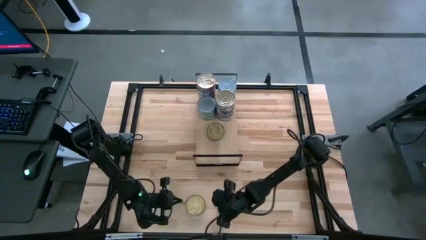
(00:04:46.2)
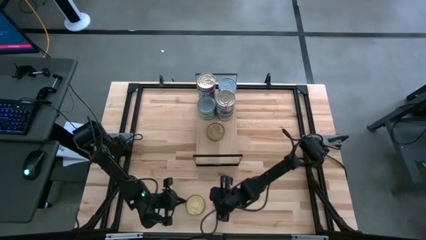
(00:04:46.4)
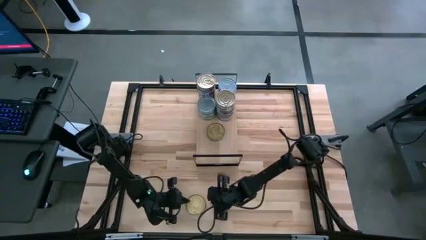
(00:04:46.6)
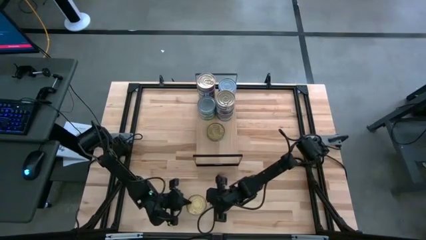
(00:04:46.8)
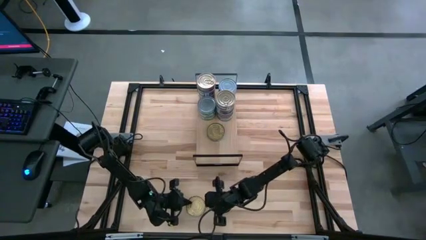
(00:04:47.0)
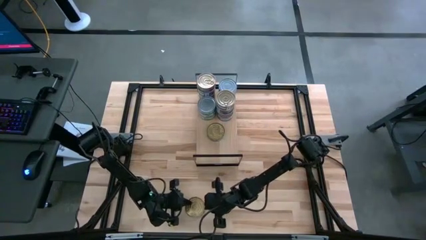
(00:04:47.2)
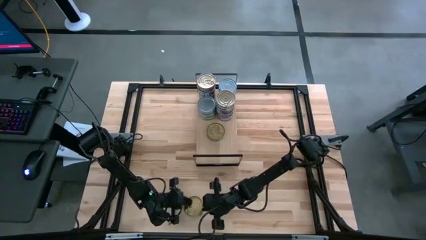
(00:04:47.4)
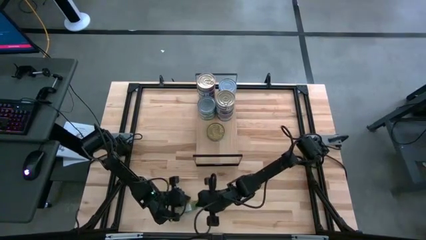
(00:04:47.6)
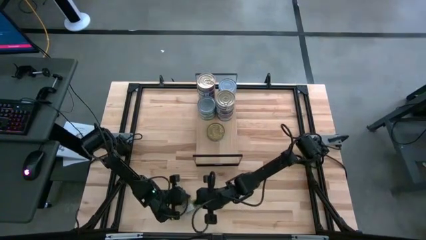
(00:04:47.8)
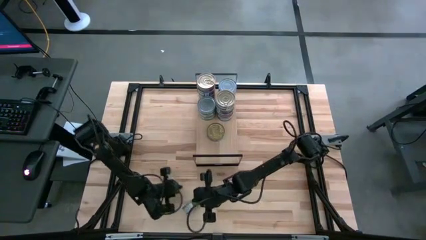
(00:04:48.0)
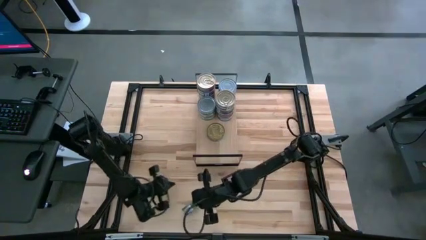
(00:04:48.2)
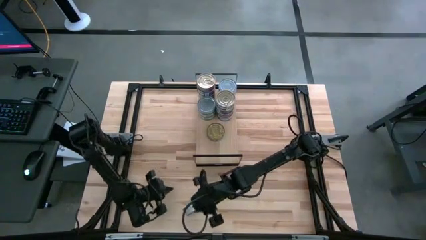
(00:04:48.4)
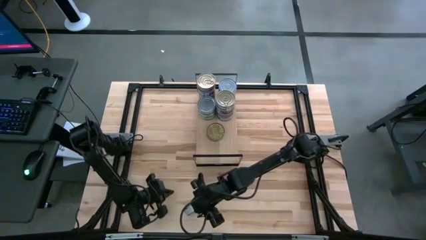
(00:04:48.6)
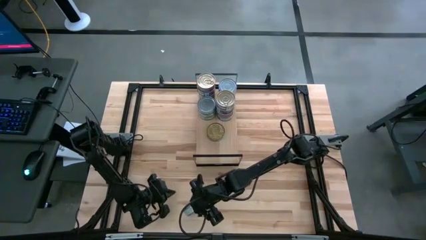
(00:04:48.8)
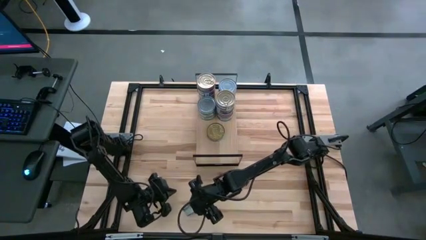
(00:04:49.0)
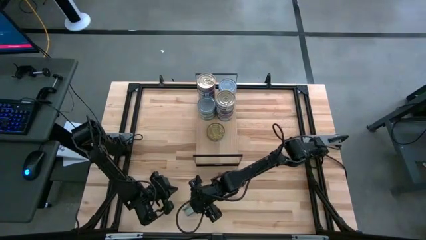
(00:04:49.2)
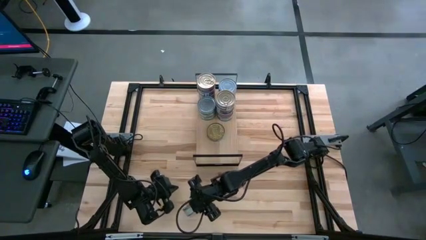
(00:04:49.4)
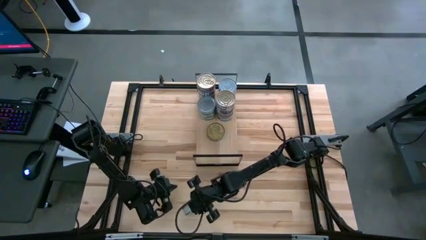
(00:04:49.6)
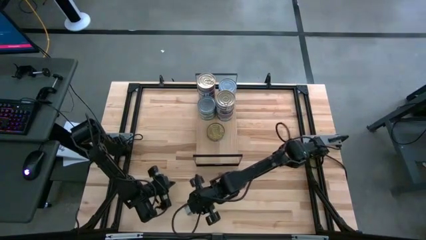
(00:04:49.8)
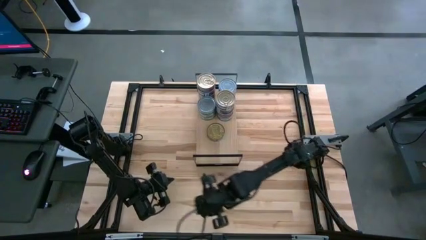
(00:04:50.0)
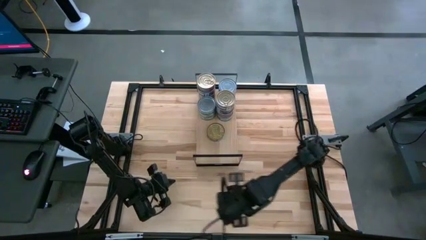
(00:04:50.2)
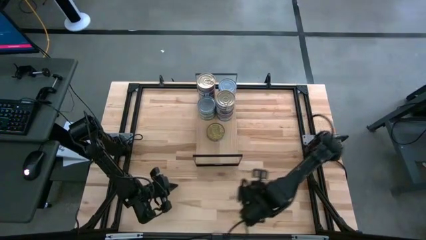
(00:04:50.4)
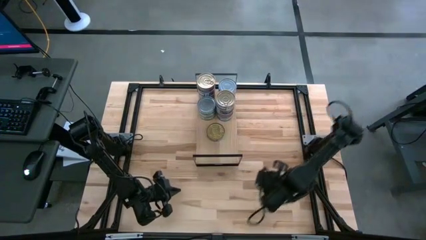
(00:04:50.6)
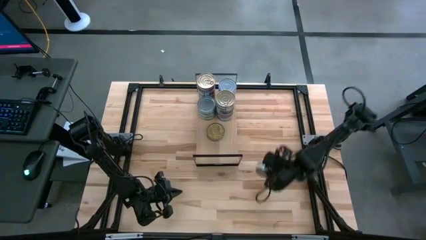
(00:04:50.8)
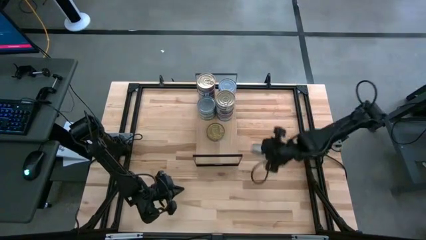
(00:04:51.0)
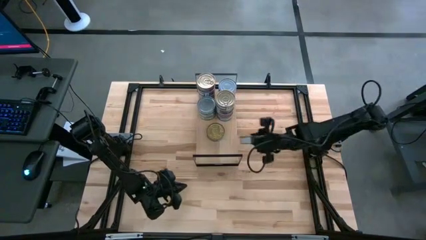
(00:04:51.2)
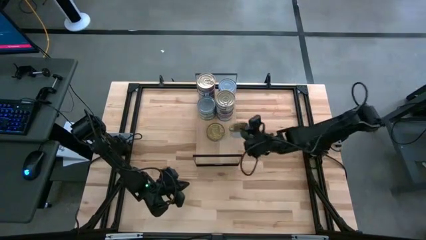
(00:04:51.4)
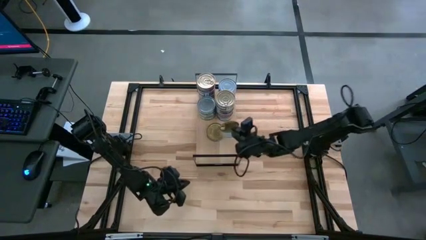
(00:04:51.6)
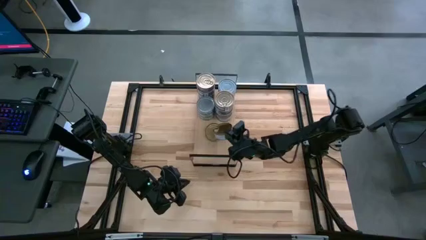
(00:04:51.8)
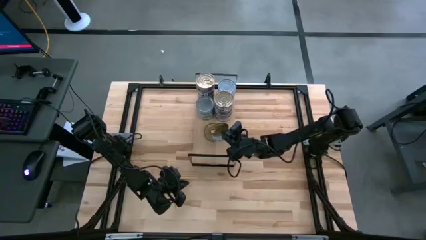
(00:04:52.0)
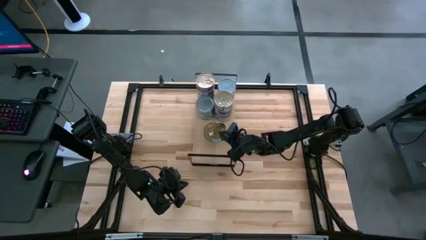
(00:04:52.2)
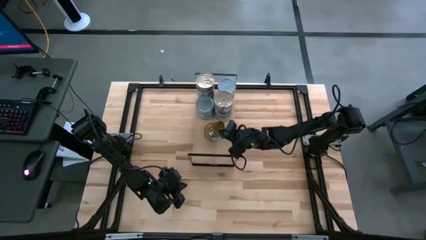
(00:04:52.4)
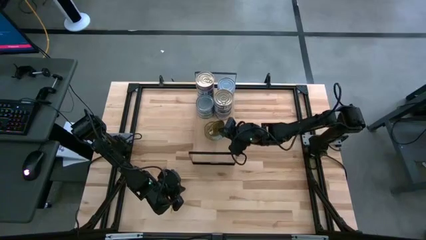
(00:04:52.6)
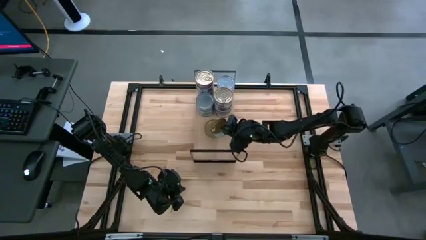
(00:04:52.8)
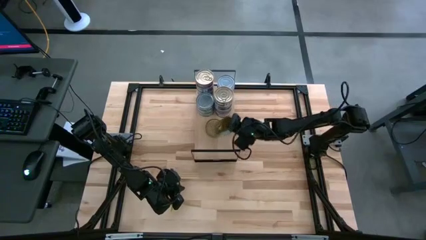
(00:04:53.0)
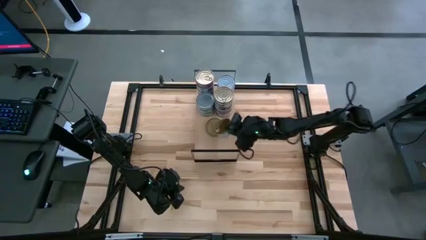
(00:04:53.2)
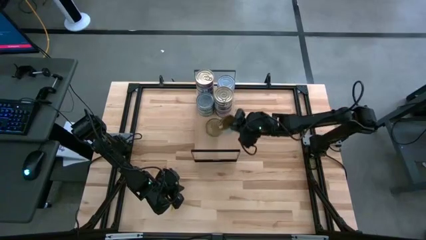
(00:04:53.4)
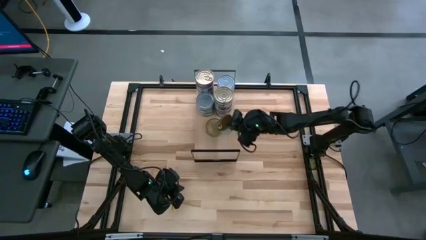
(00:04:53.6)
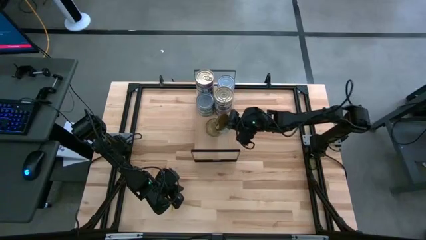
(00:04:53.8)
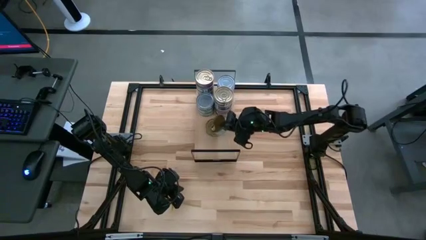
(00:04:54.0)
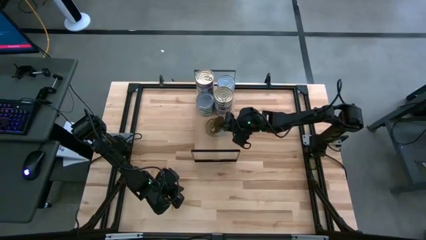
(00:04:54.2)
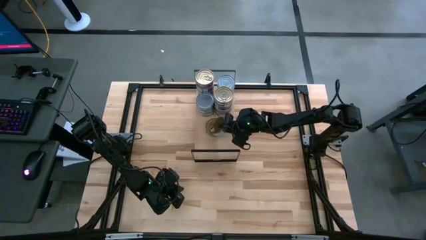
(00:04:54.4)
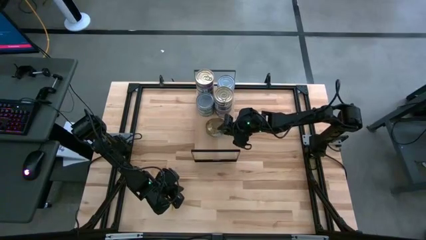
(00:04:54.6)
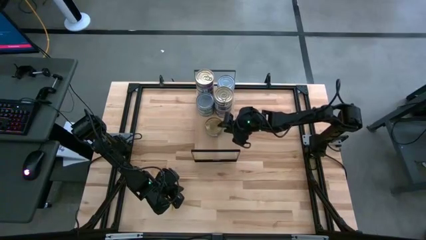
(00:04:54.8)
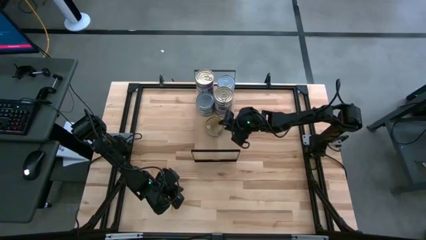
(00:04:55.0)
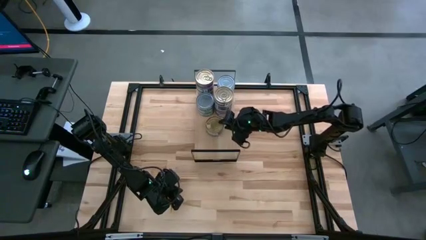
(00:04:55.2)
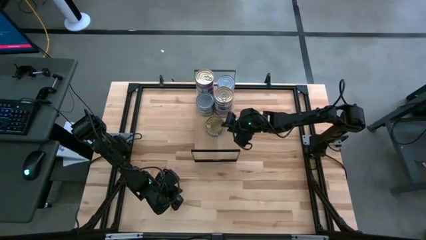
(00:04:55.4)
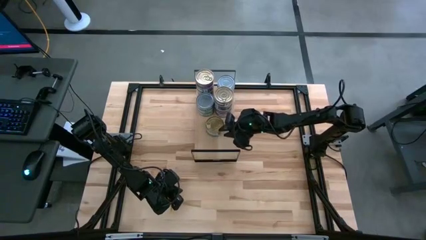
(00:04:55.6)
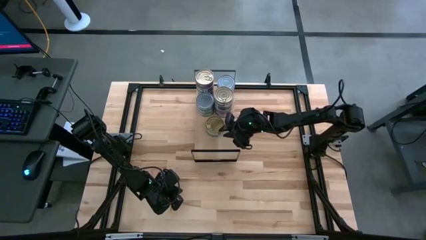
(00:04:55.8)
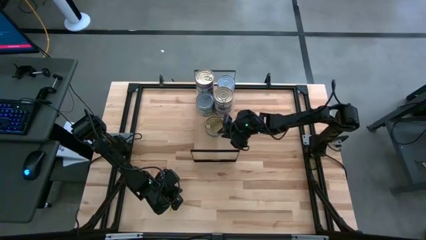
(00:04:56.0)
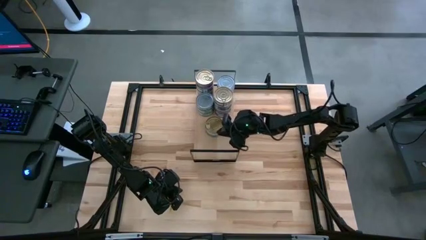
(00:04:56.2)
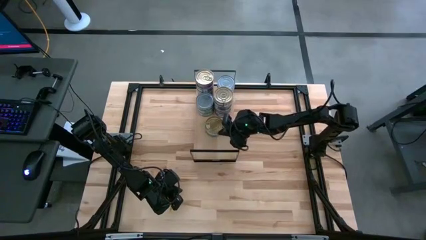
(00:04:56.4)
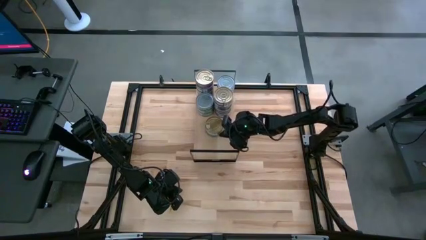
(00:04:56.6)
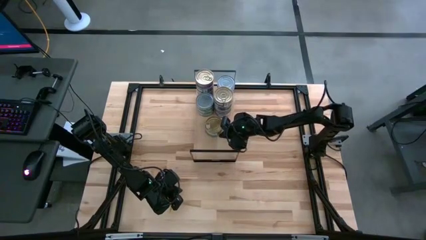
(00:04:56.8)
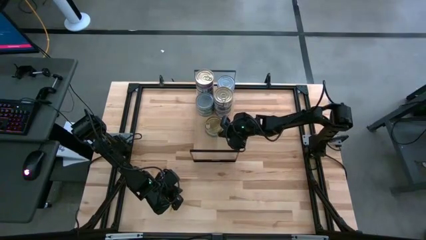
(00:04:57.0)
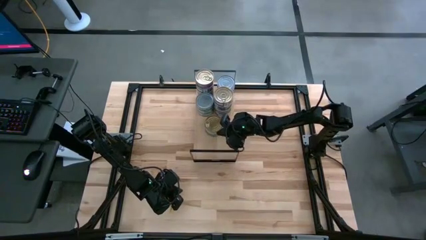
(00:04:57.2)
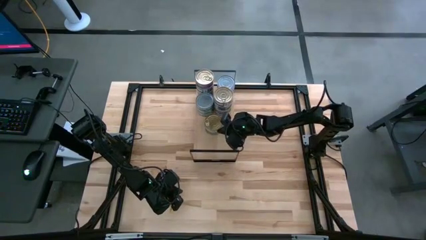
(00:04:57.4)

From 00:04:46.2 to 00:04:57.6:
Task: Stack canned seafood by type on shelf
Stack the green tuna can on top of the green tuna can on the shelf

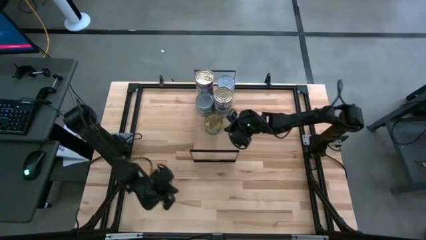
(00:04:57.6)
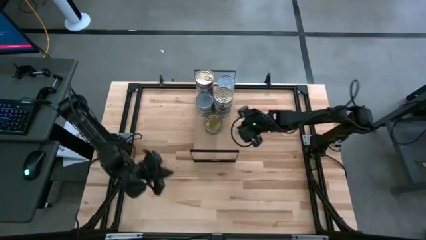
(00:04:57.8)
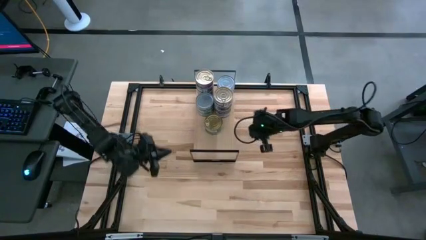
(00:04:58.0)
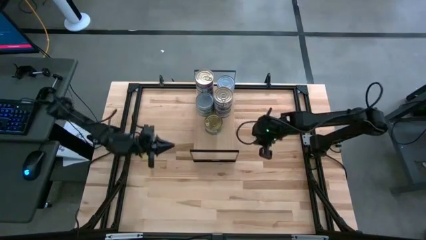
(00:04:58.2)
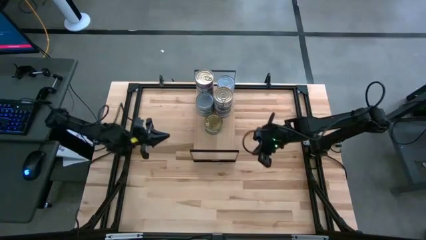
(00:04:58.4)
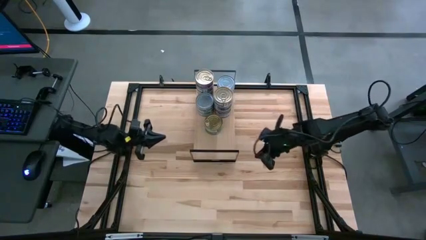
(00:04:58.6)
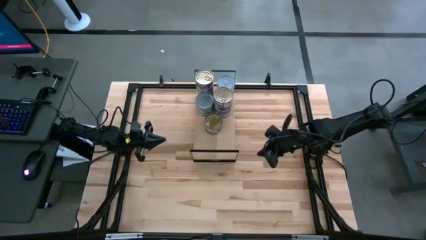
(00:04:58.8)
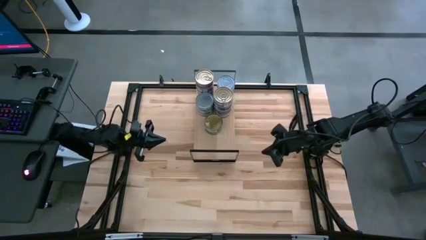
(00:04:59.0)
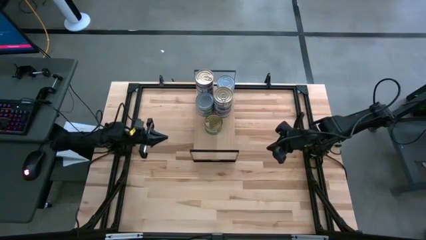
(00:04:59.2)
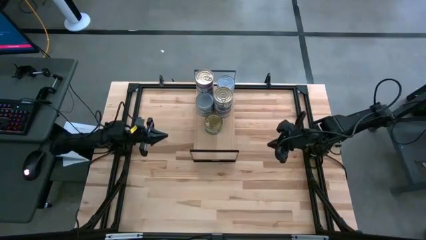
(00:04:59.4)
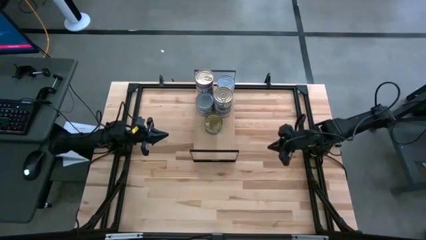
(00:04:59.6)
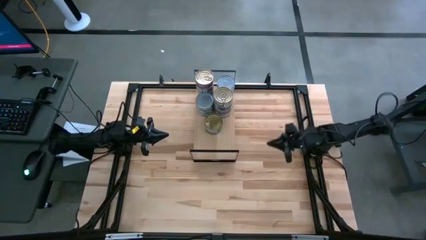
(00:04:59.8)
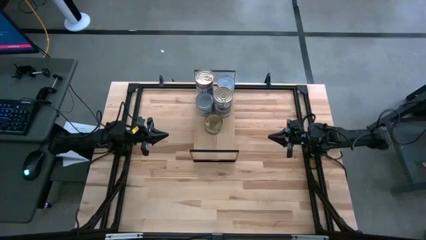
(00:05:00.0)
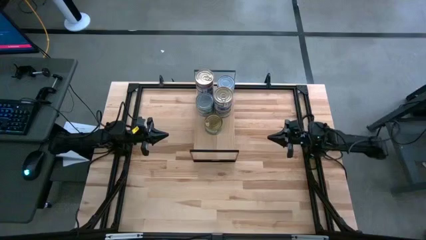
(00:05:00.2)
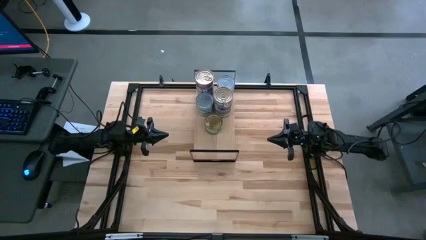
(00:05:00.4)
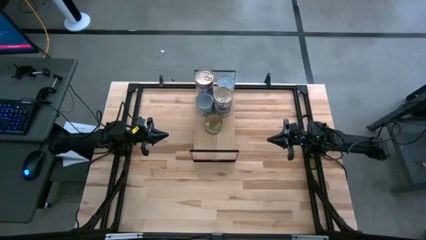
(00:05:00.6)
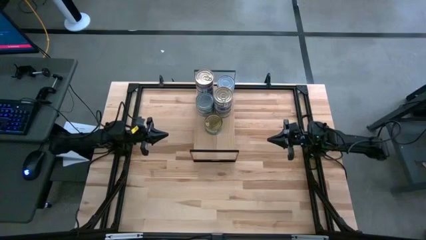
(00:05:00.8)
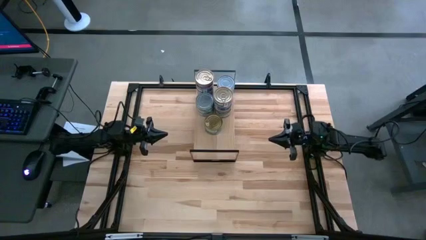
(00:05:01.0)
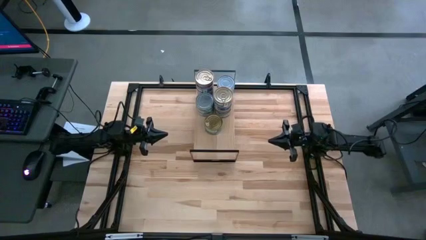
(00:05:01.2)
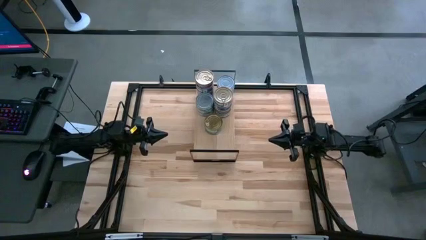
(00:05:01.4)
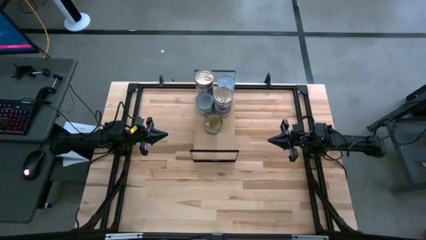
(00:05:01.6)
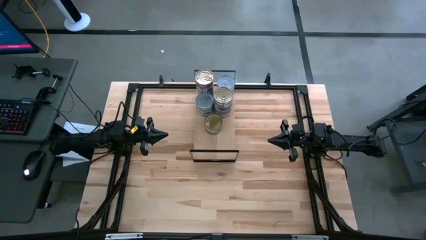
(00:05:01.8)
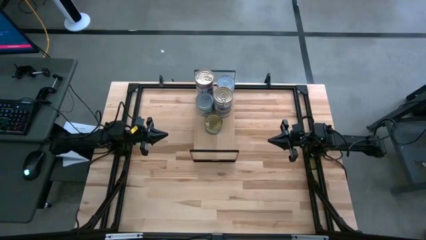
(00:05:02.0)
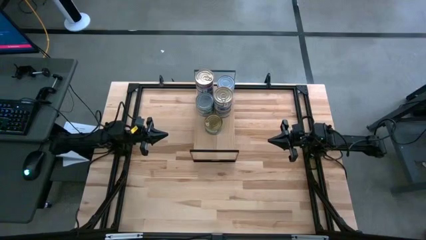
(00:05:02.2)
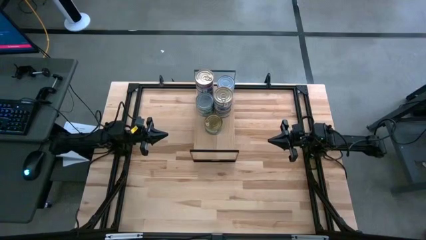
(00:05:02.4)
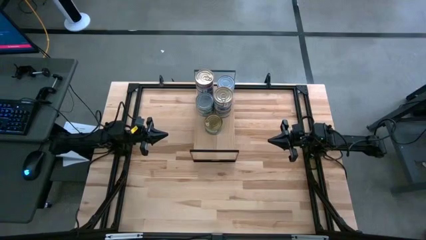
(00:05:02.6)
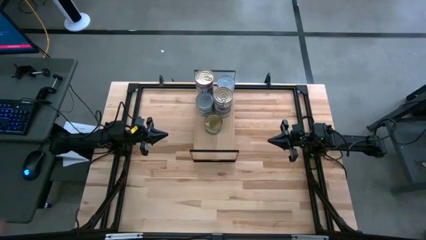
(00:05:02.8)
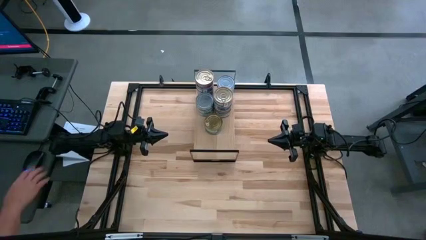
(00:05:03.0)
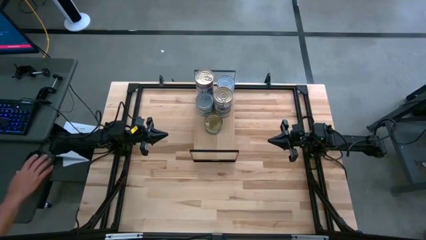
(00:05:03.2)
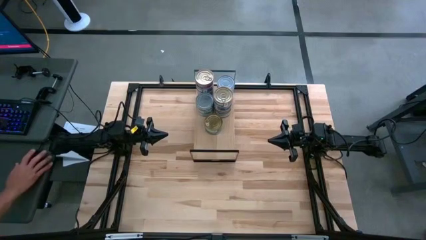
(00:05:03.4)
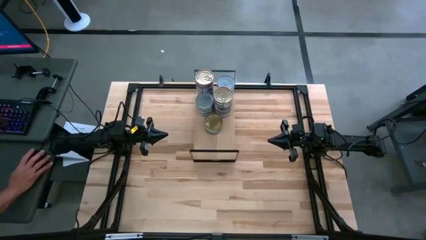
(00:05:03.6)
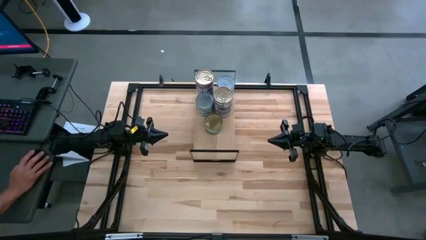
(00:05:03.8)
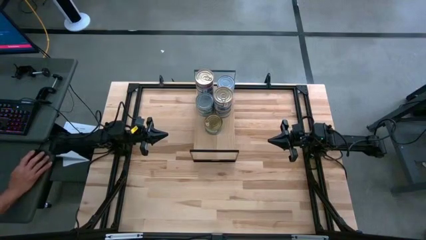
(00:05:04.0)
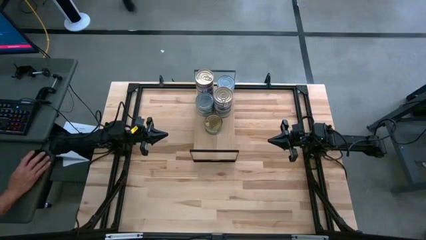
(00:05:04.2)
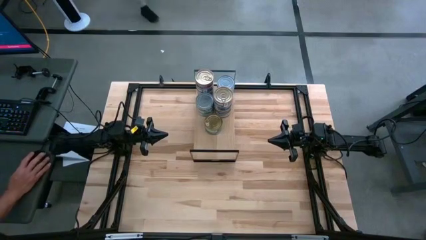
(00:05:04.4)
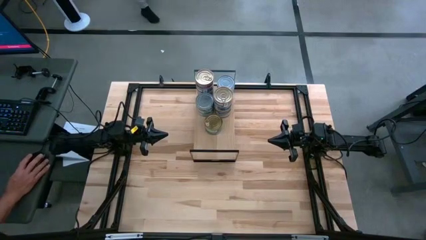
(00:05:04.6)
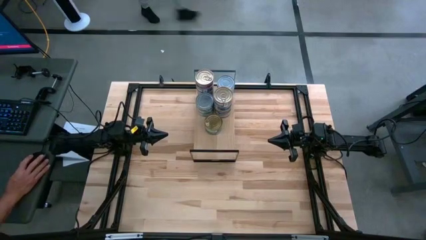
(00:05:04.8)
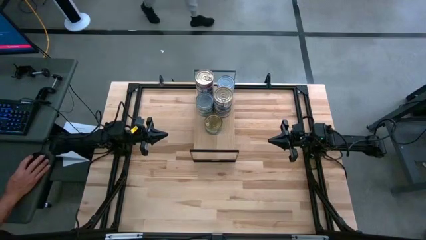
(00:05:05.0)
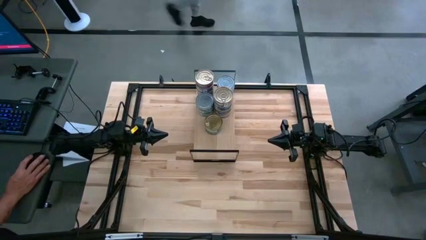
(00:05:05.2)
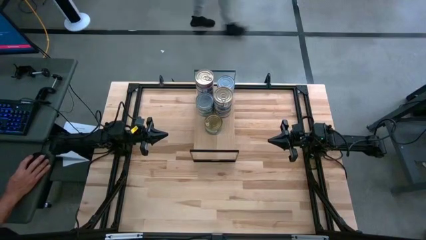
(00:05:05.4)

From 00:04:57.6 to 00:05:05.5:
Return to Home Position
